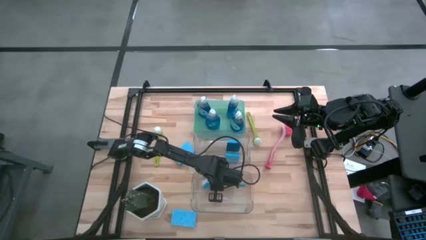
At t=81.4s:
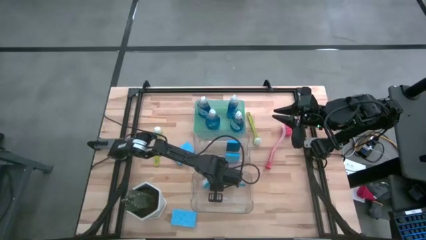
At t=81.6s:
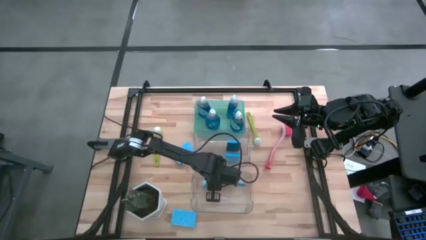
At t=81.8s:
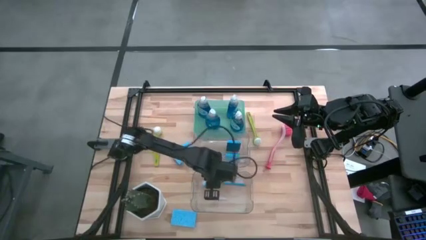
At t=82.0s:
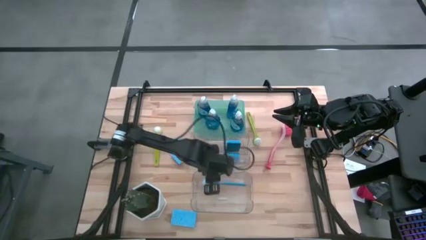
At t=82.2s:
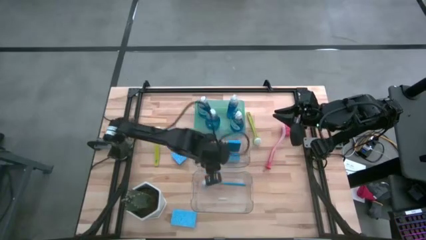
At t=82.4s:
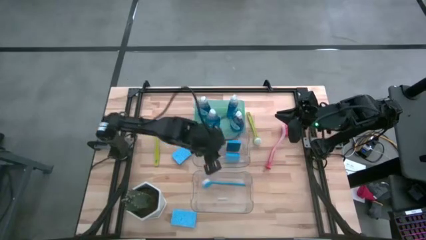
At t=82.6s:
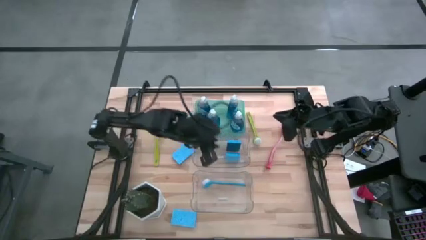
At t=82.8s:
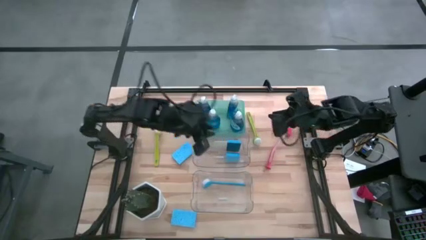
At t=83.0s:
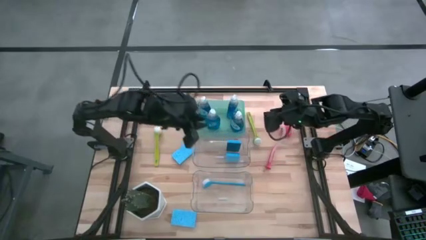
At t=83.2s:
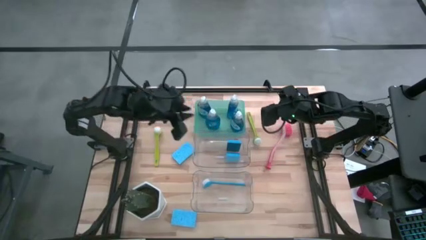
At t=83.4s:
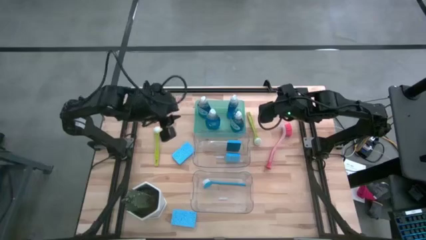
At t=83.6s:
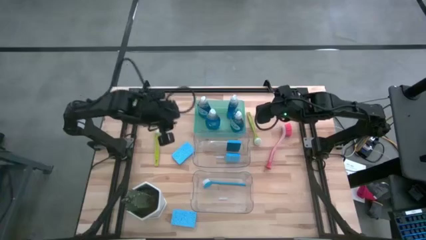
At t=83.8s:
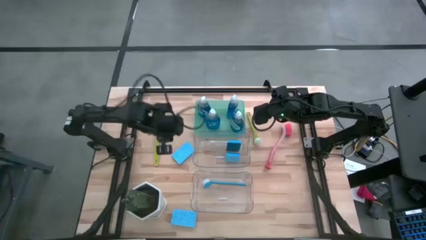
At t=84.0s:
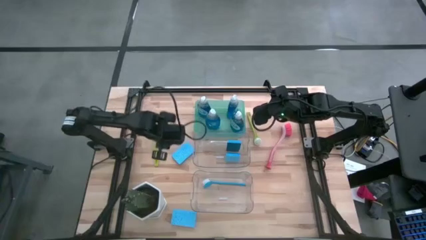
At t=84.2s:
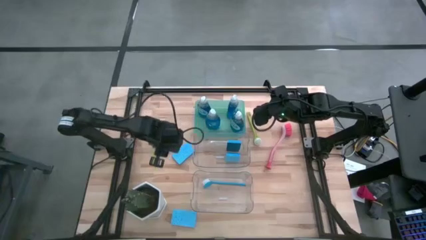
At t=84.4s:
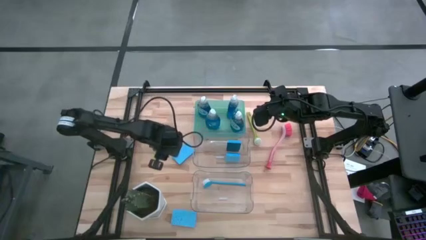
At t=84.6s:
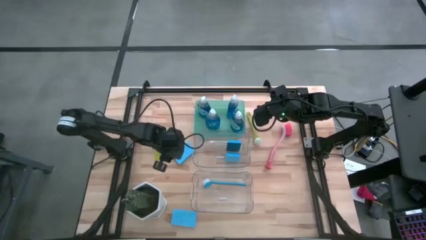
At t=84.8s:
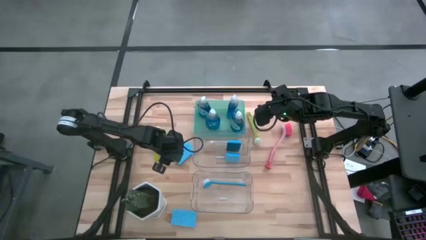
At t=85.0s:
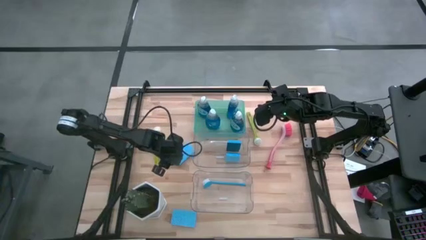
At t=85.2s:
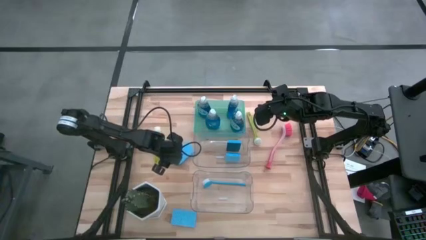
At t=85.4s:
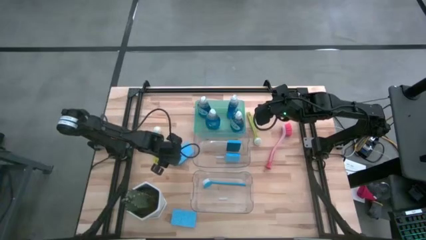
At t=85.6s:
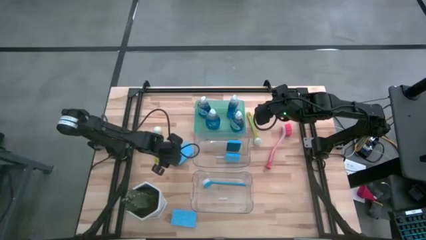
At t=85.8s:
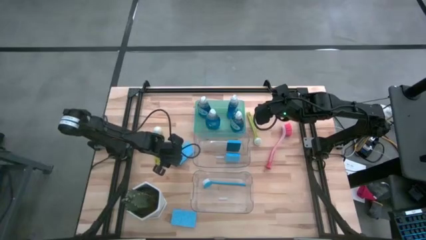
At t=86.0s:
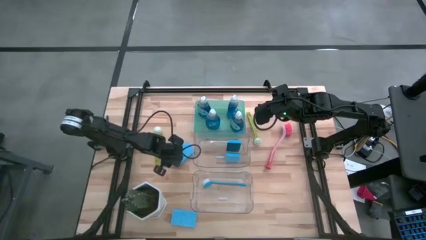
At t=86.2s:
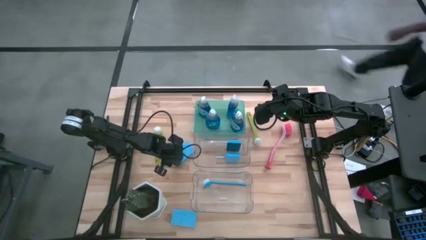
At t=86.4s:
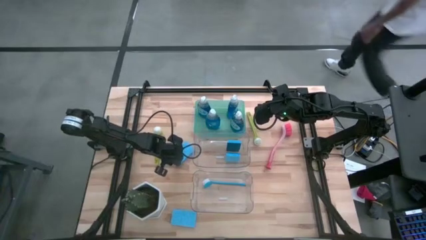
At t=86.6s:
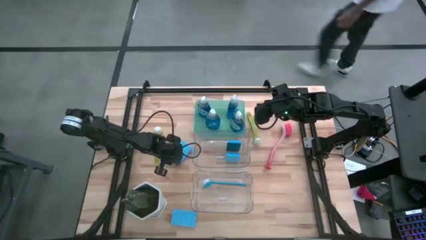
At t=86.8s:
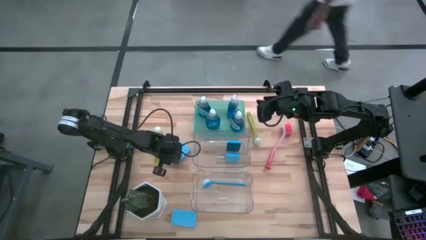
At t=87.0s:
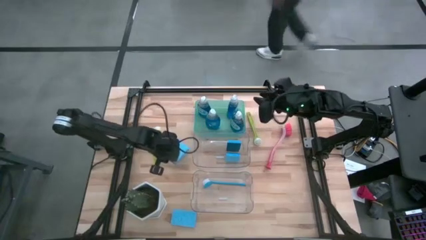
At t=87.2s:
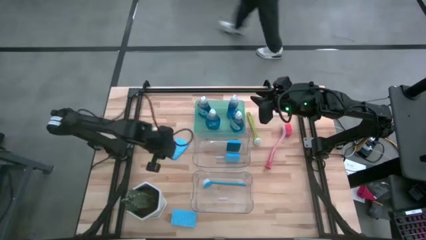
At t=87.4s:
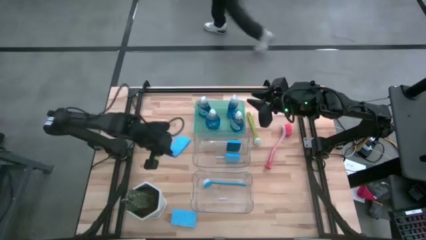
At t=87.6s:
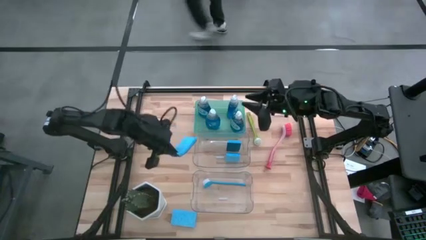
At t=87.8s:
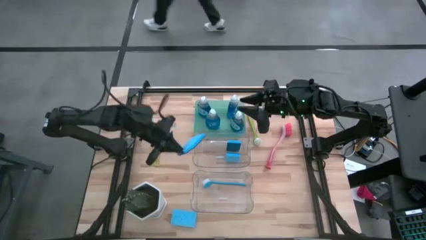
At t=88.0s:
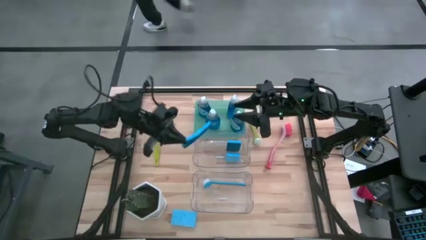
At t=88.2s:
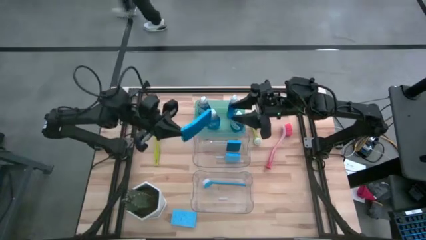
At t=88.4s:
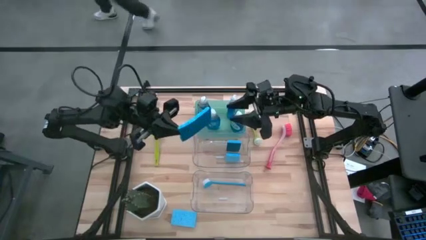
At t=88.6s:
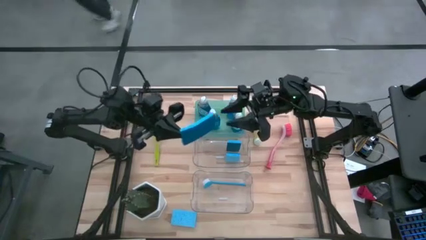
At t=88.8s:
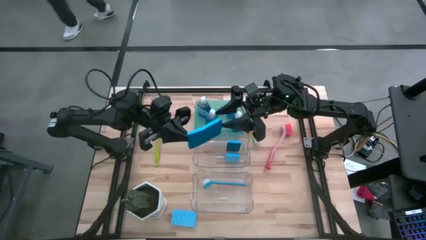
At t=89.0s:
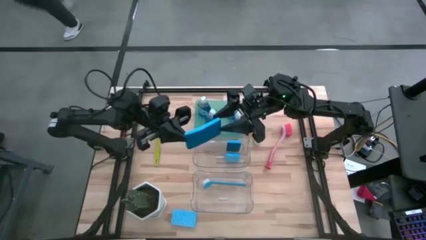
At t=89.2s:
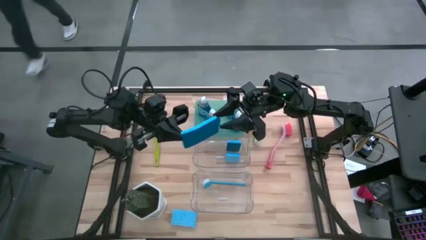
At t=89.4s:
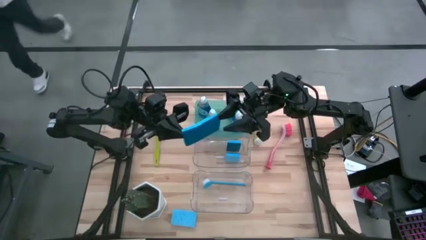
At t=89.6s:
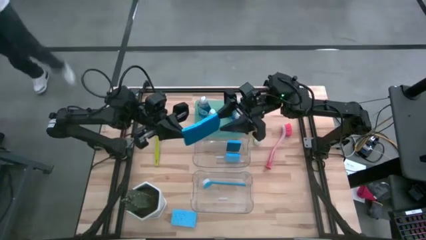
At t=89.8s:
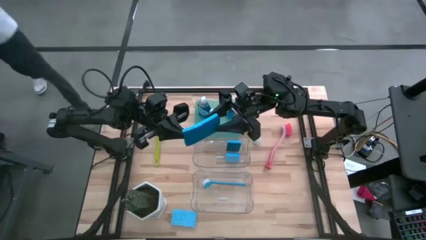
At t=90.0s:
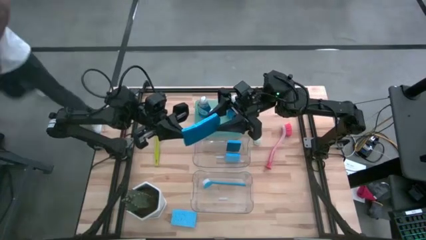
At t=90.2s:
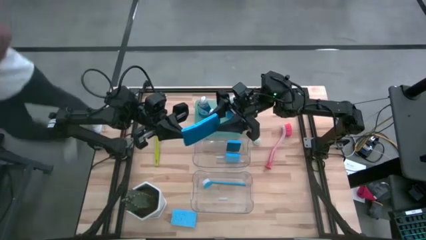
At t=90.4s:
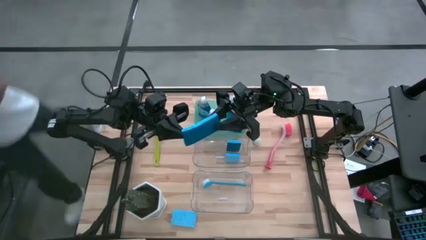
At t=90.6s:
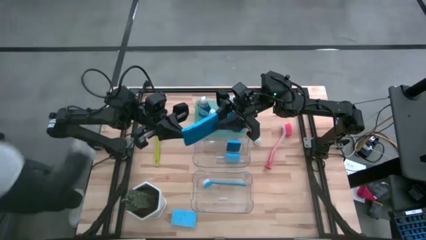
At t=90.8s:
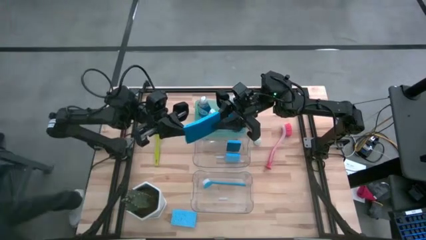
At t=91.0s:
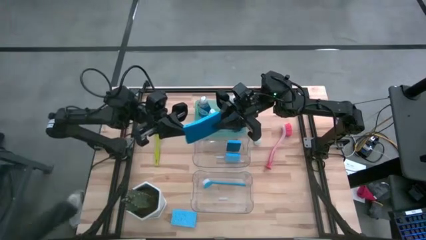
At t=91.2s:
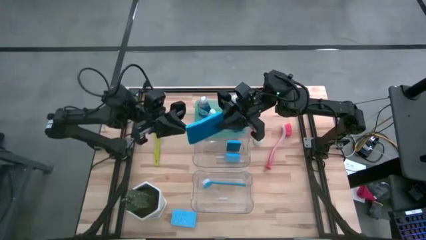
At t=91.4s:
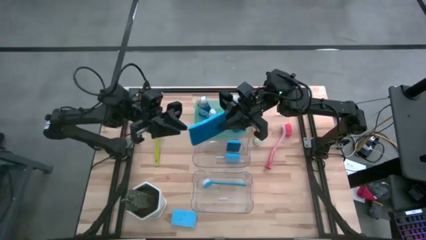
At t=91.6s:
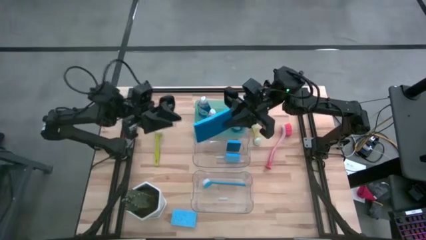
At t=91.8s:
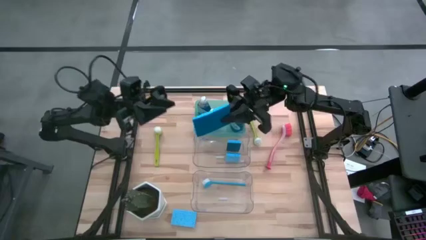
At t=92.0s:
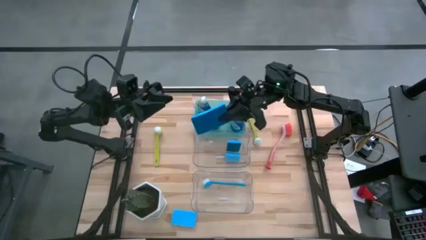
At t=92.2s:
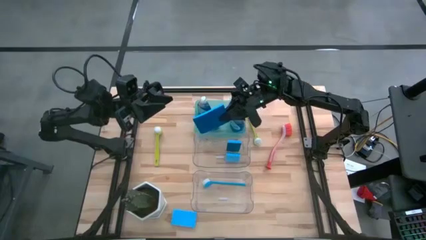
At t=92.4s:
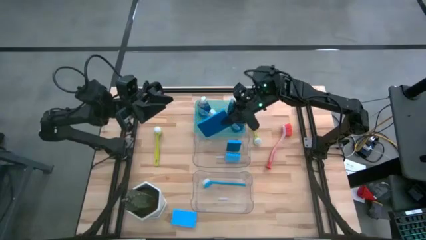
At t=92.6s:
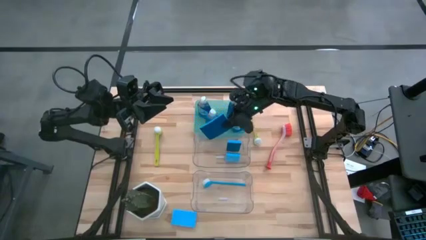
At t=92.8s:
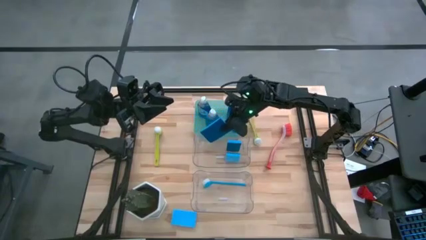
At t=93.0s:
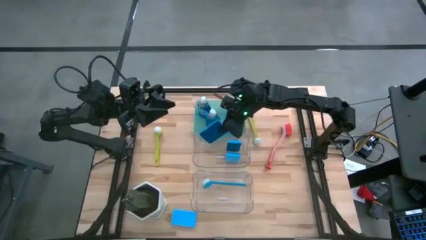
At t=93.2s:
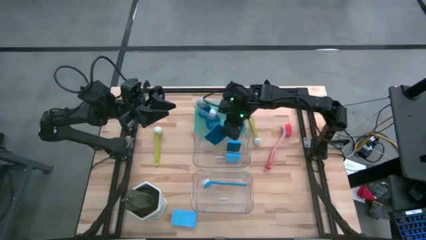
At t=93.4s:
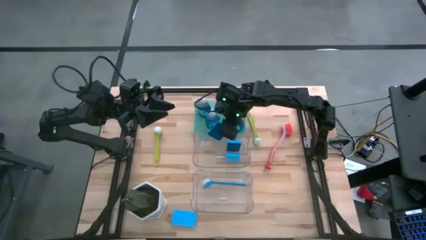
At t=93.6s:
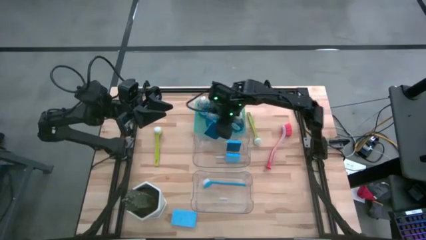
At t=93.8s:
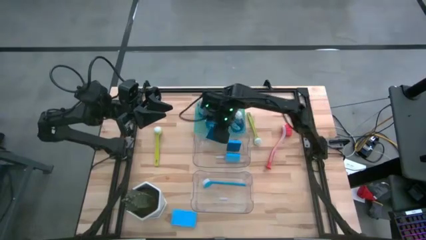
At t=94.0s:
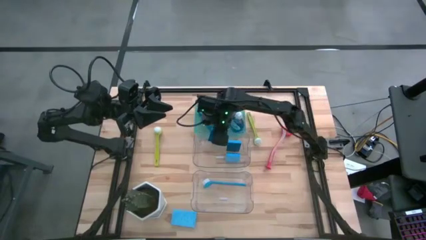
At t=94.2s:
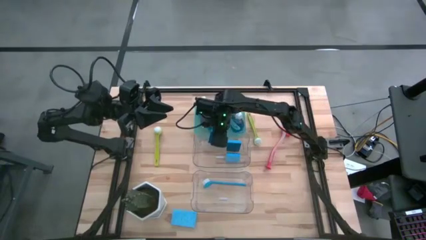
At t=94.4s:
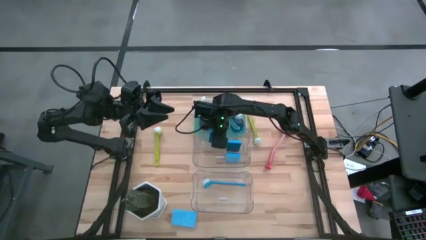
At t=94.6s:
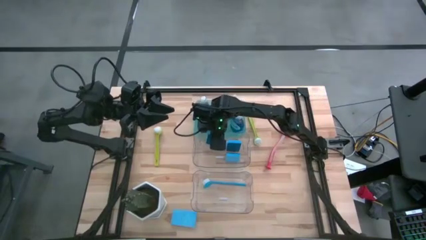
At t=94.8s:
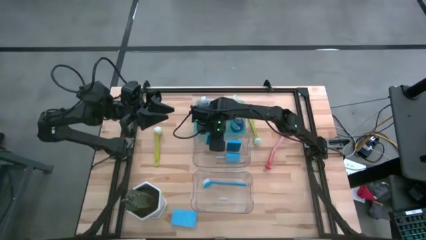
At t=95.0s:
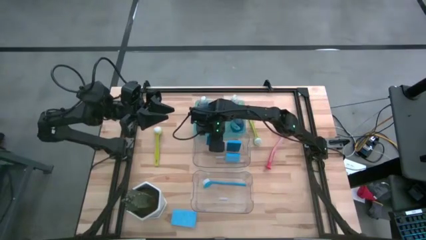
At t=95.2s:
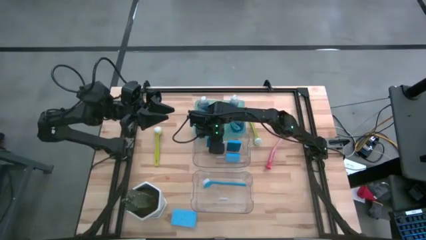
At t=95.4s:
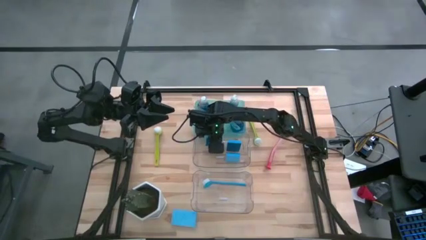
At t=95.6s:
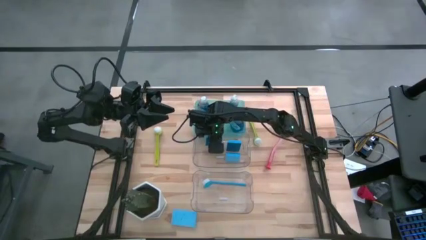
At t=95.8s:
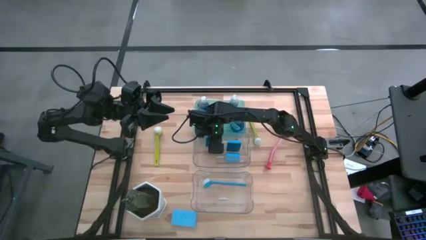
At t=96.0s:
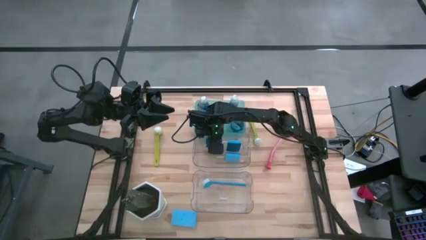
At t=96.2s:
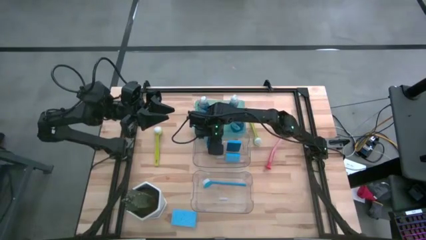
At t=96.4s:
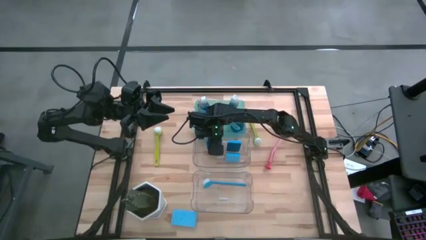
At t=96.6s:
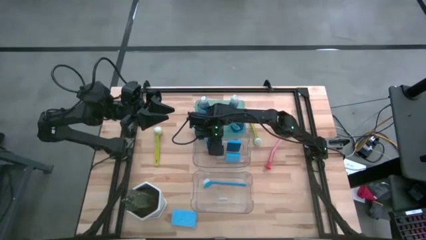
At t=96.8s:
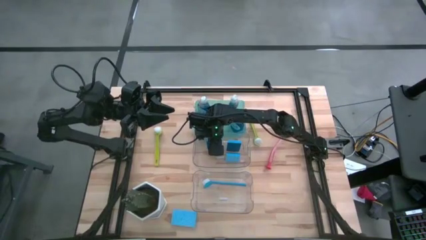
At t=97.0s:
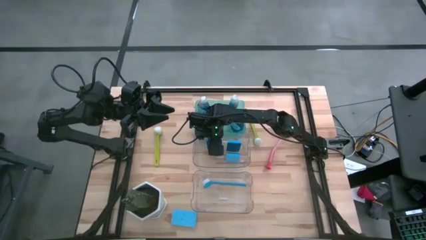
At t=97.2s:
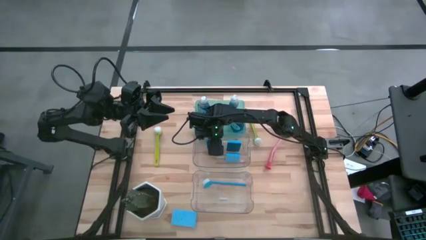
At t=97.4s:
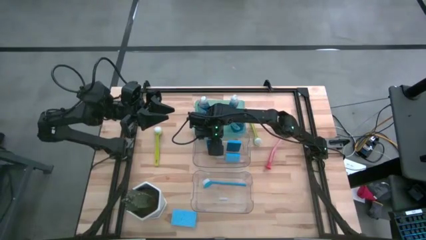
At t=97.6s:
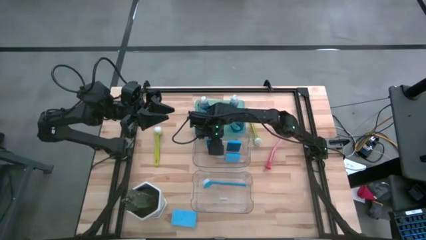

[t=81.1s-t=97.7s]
Task: Pick & Place Kitchen Sink Supplies
Put the blue sponge into the top transparent bin
